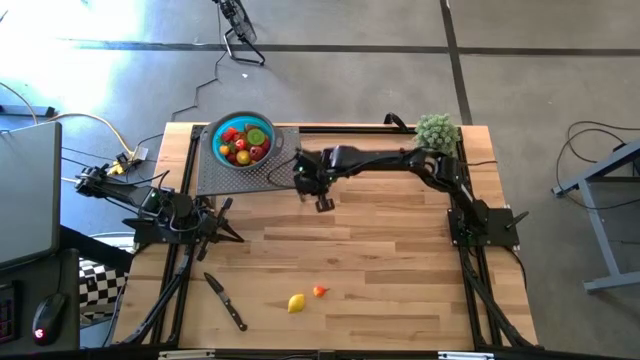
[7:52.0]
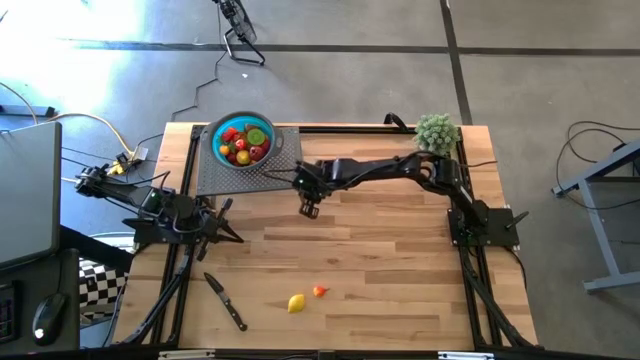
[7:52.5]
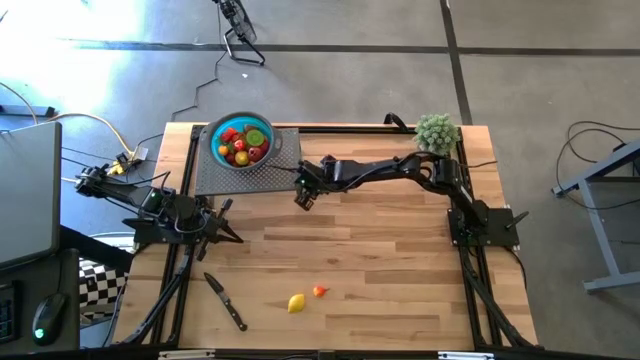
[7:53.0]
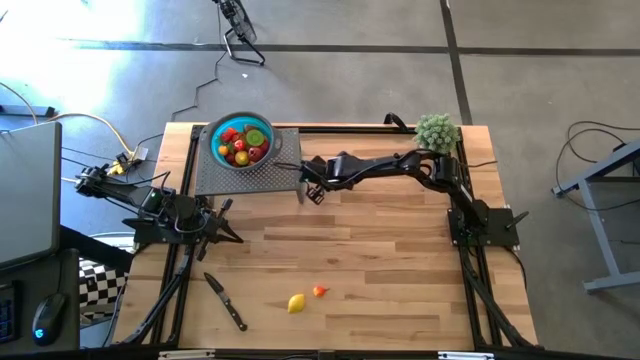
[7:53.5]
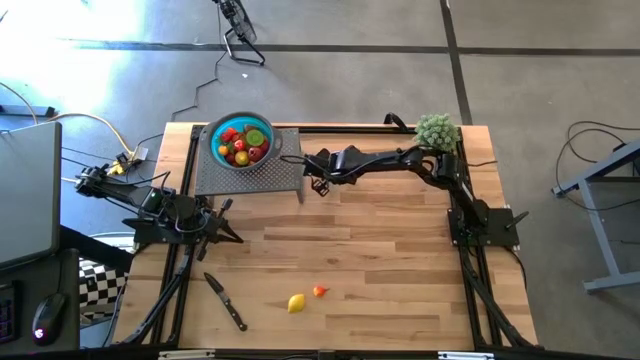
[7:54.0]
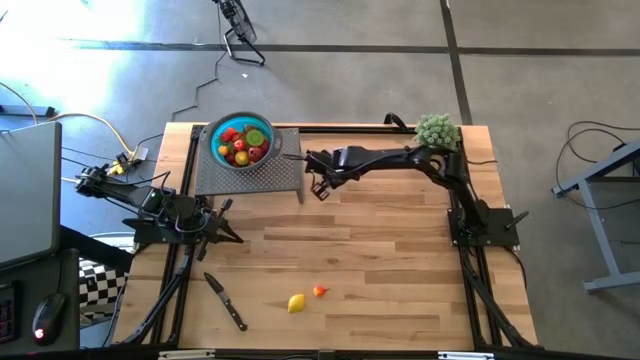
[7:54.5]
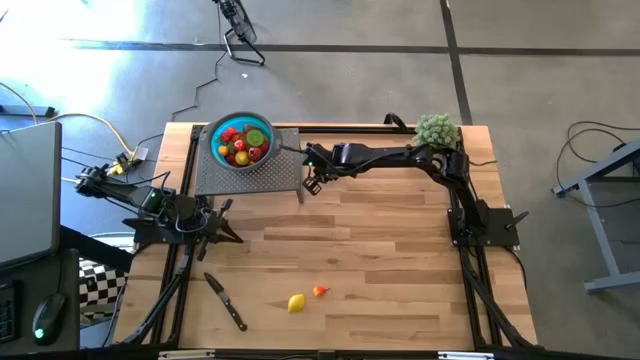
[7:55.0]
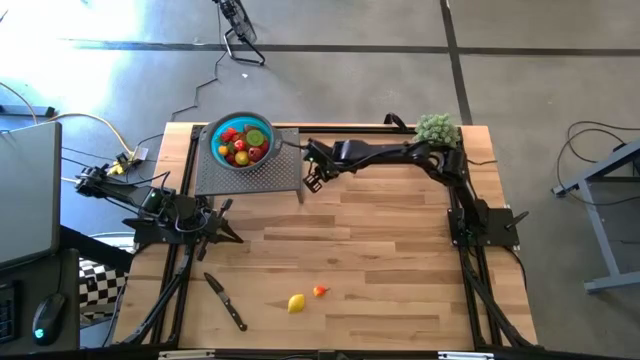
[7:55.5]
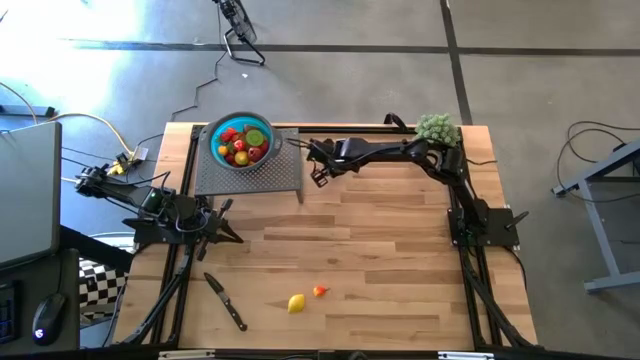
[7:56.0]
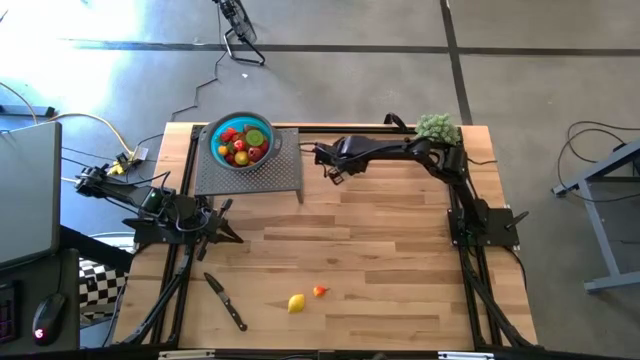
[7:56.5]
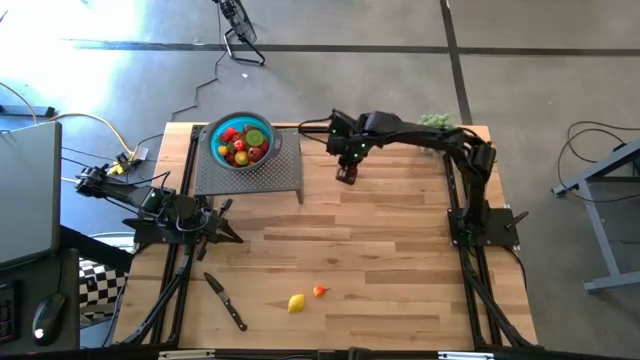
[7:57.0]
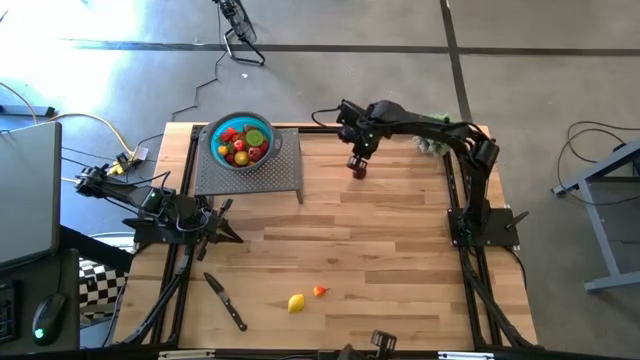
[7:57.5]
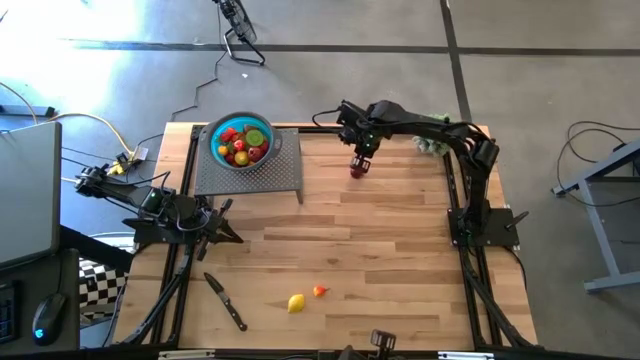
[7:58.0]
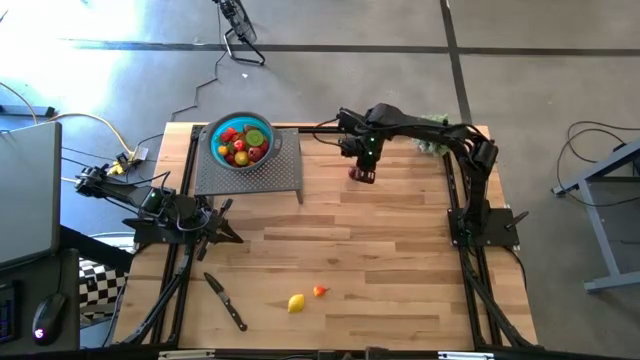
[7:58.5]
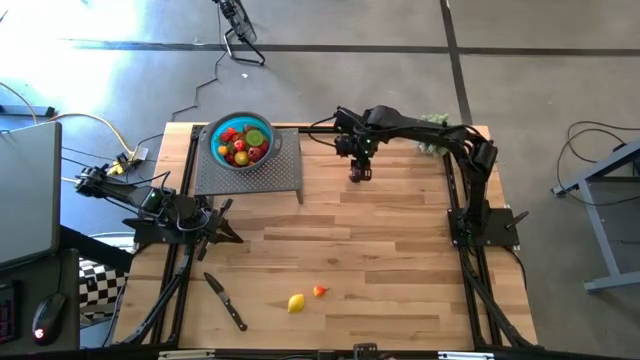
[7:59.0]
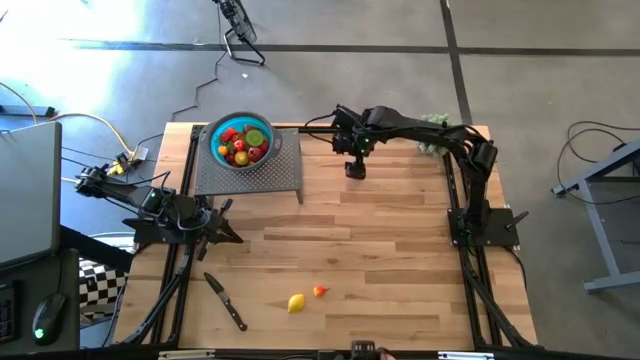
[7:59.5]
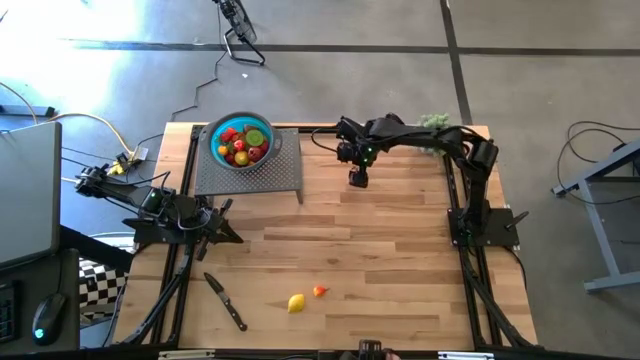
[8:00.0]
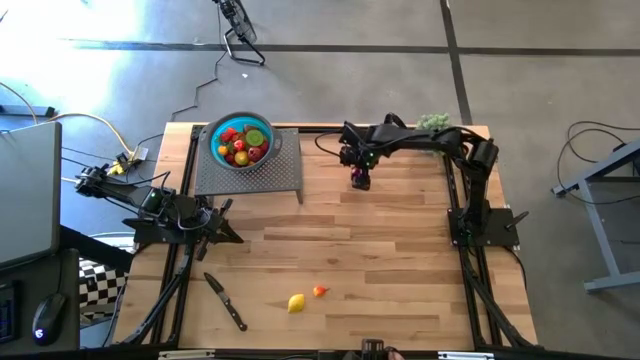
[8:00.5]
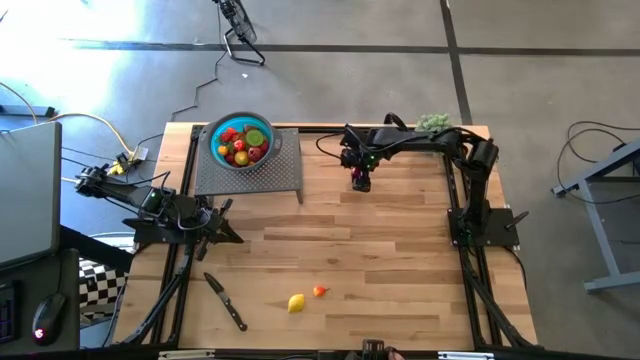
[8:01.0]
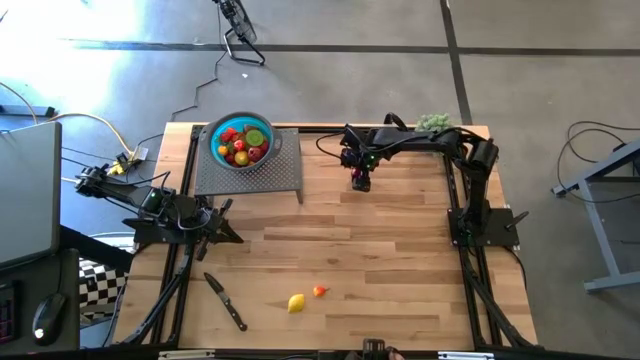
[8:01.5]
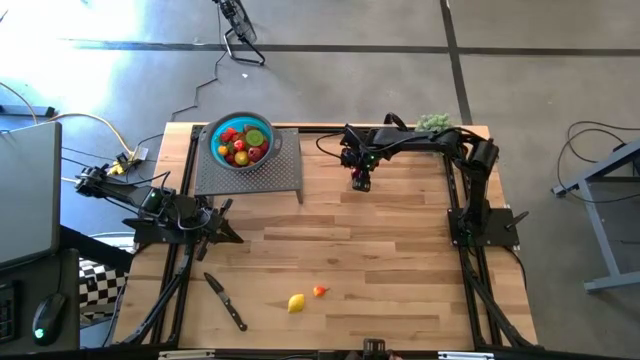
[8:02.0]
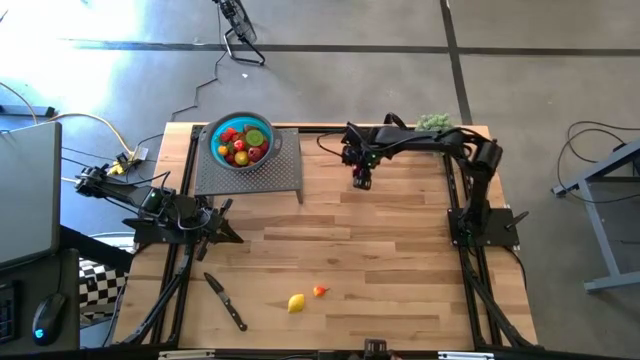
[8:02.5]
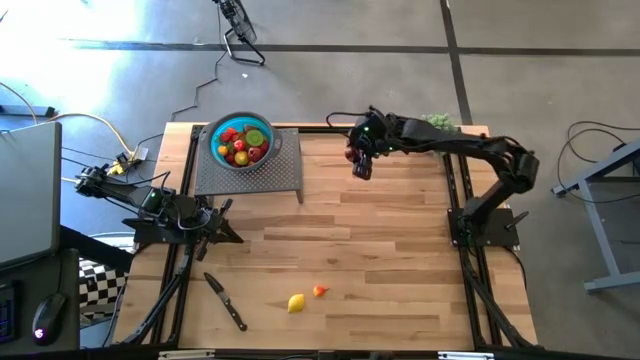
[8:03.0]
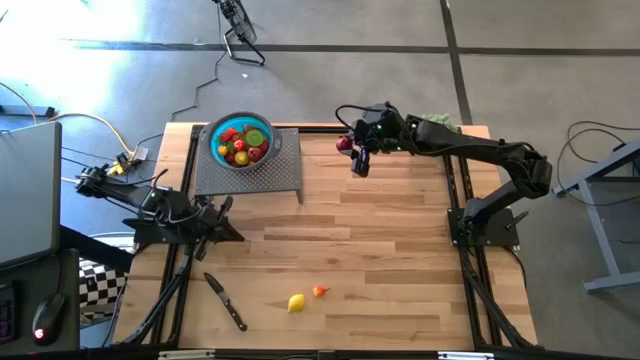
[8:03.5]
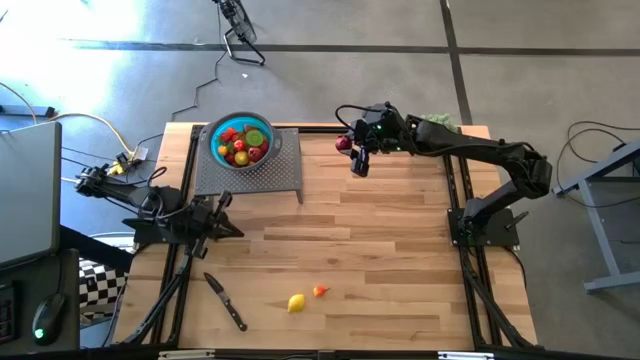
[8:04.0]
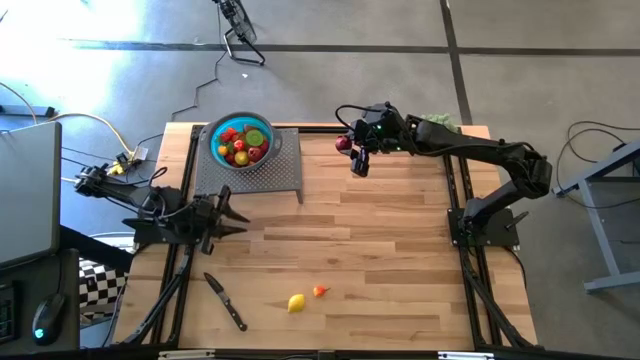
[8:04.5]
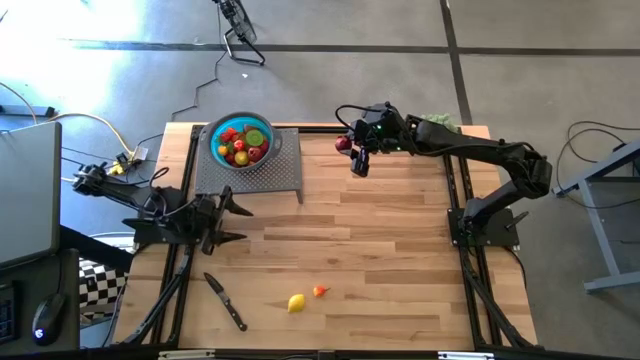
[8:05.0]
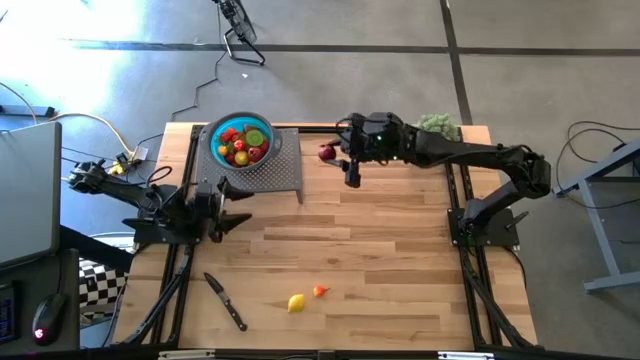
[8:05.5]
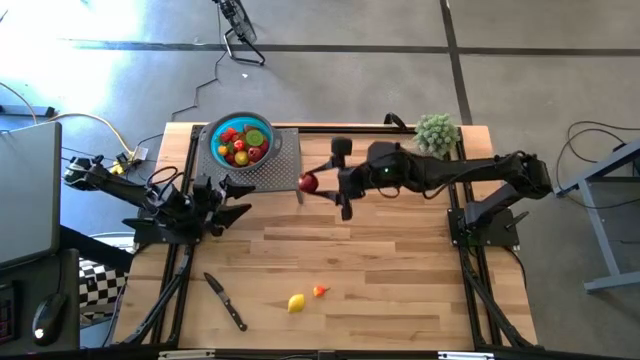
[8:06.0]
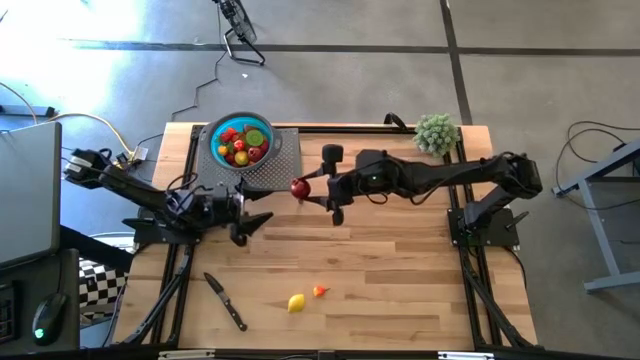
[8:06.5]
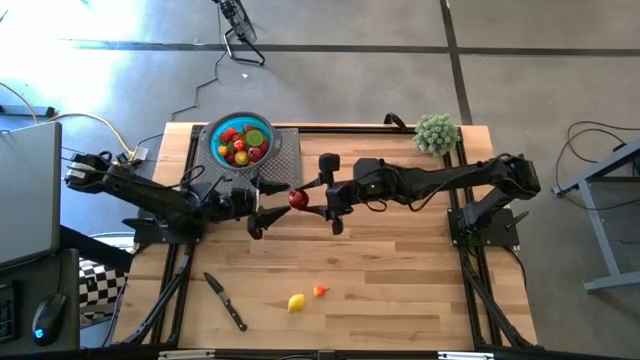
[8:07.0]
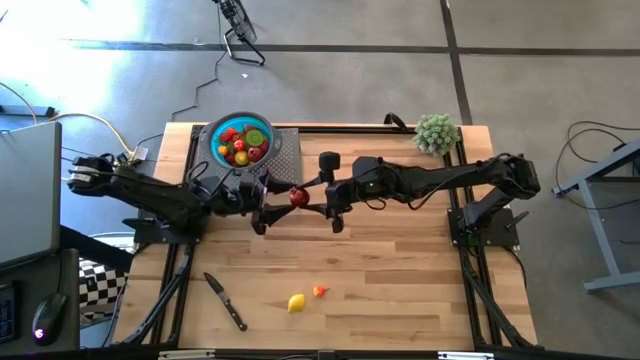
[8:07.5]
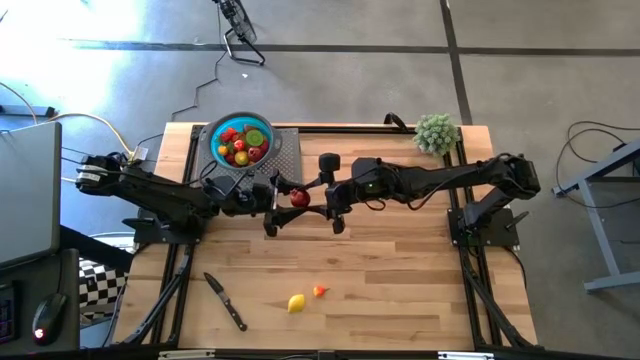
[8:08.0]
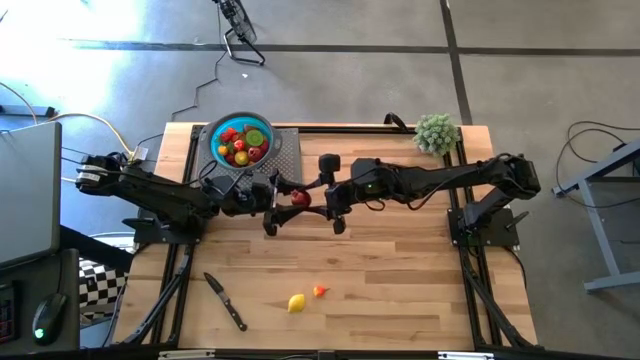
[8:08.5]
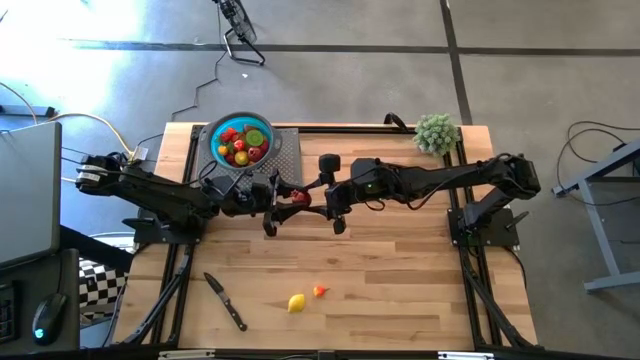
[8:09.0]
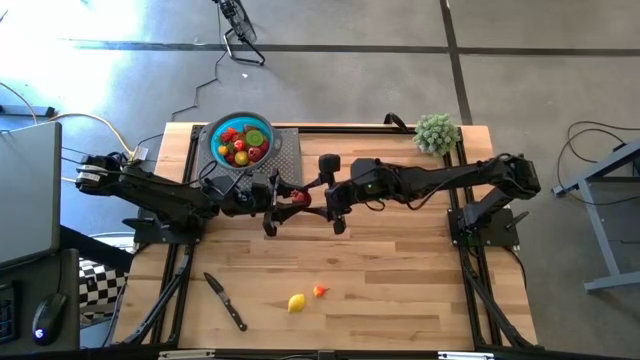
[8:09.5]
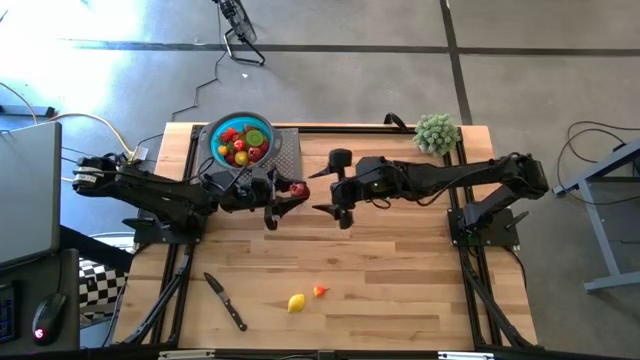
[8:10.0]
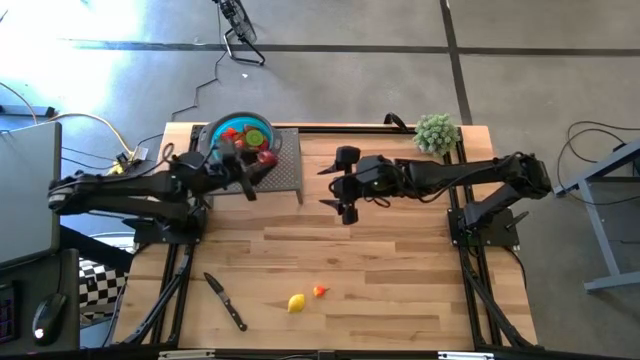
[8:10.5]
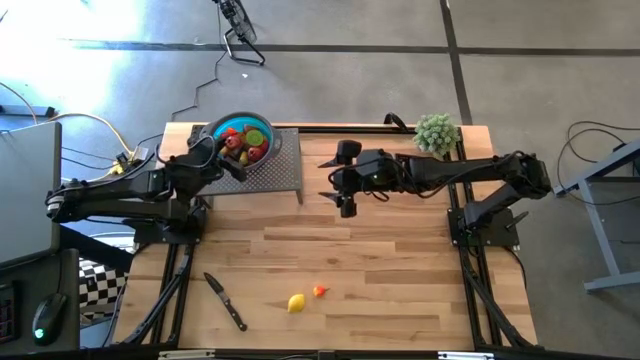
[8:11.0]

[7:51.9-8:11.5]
Task: Pick & Place Fruit
Put the red pomegranate into the blue strainer bowl on the shelf
